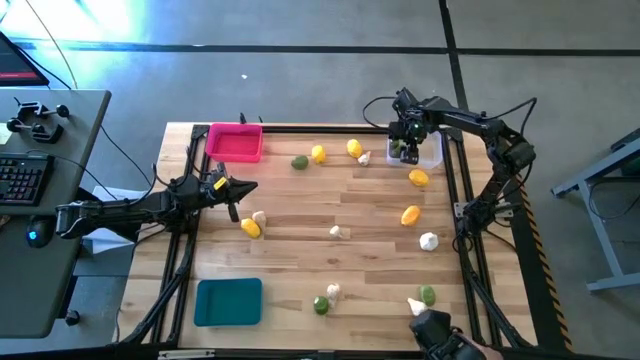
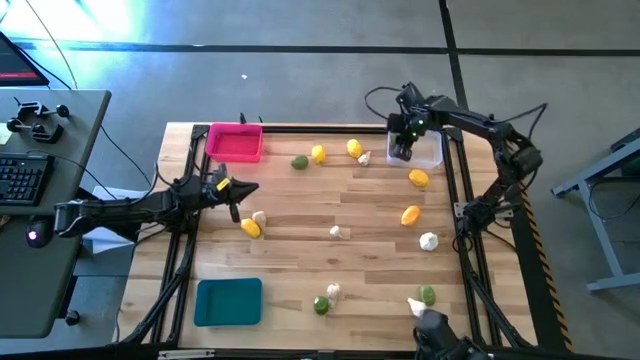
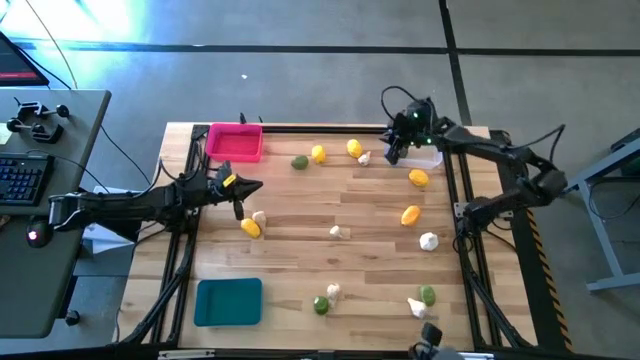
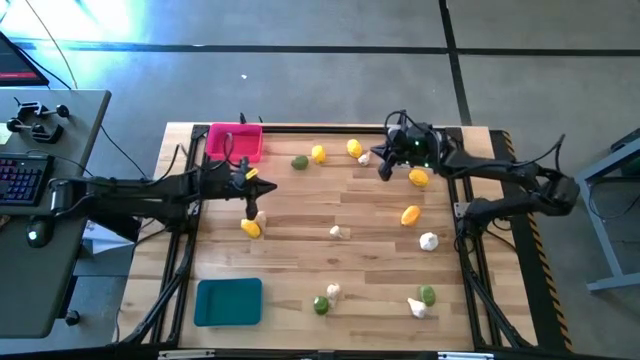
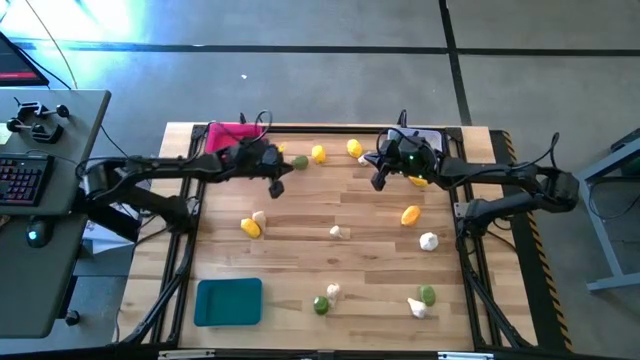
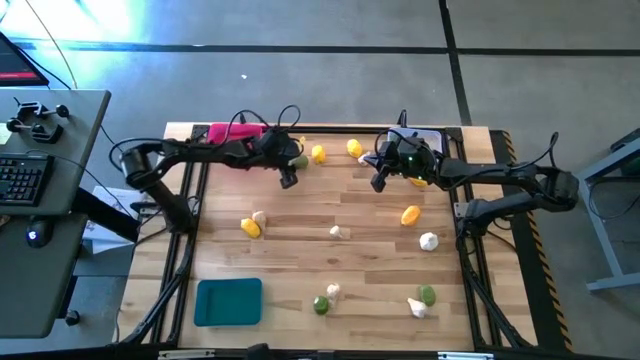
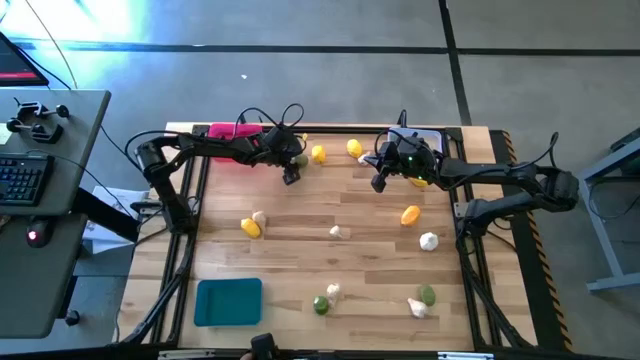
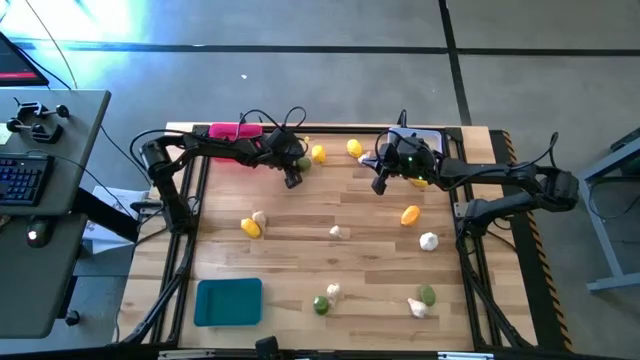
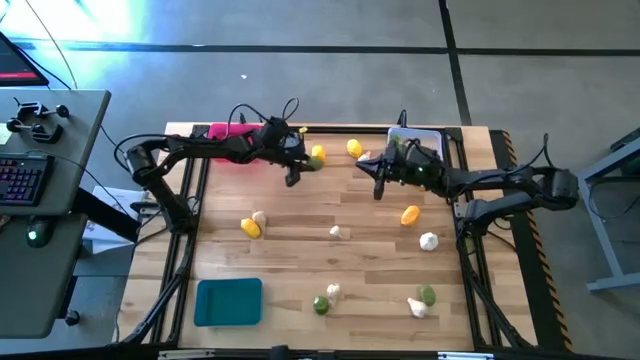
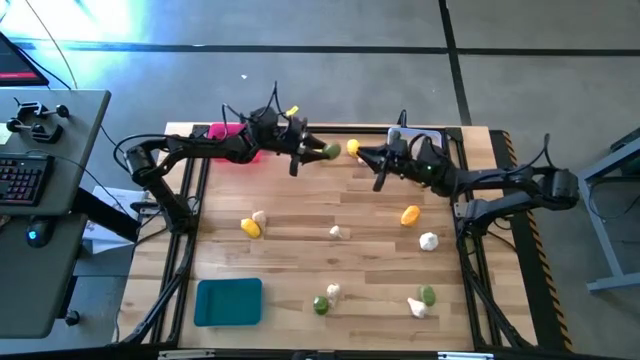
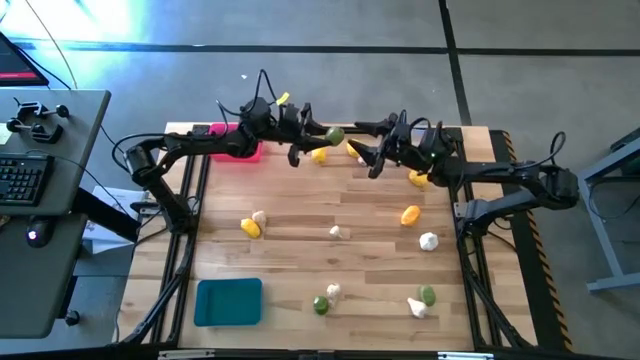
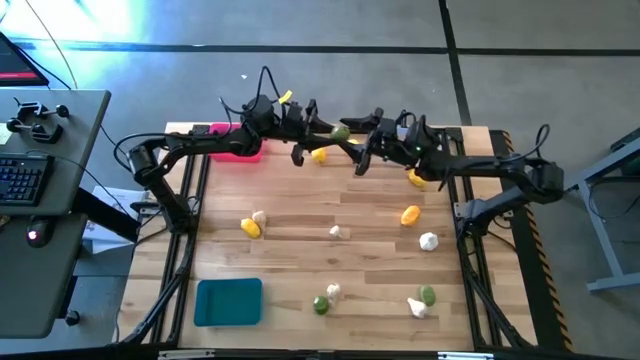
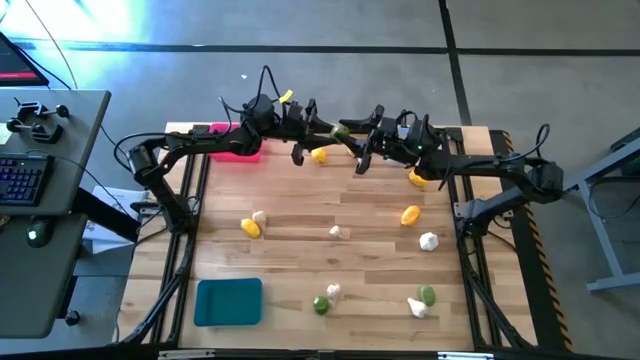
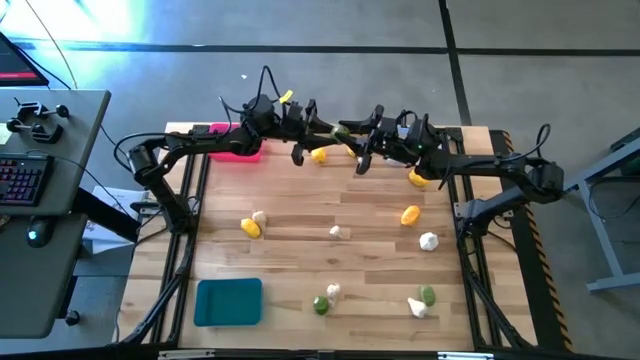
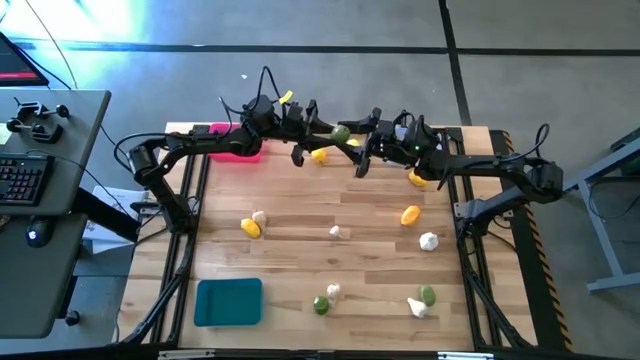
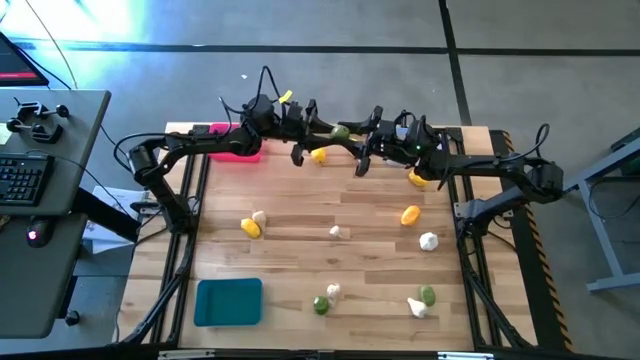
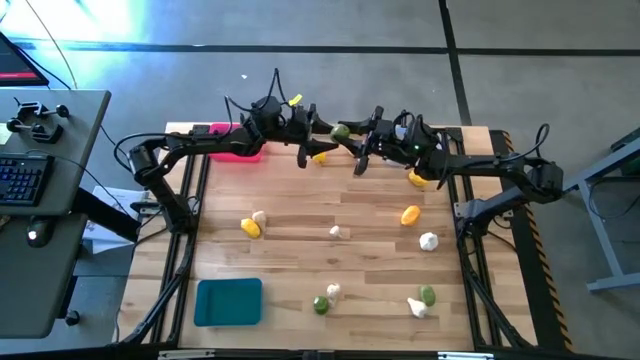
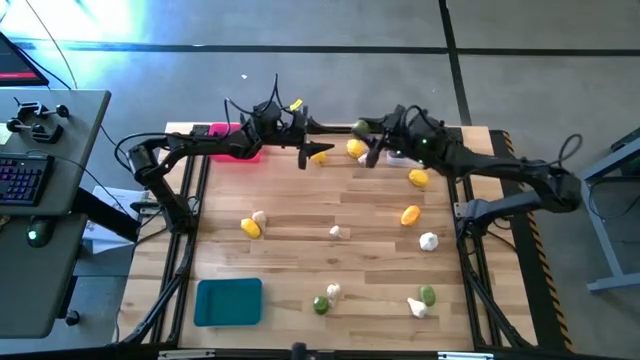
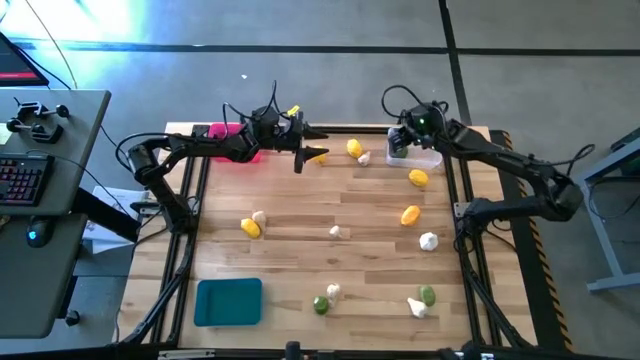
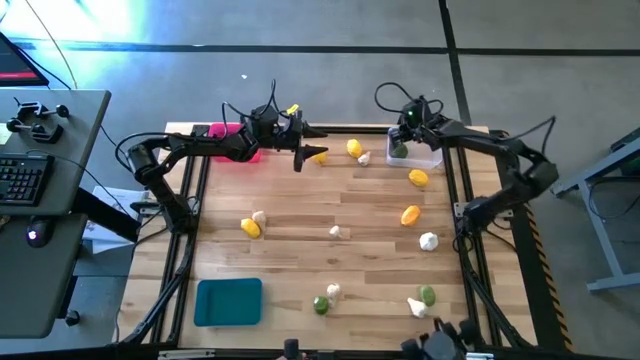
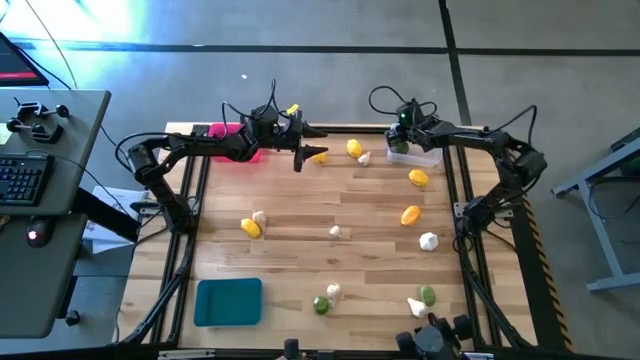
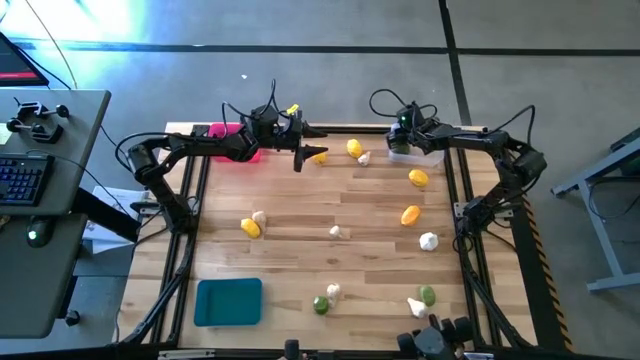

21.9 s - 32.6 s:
Task: Sort produce into baskets
Put the top center lime into the transparent bin

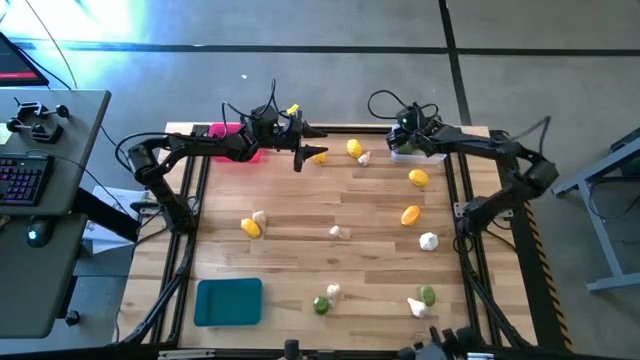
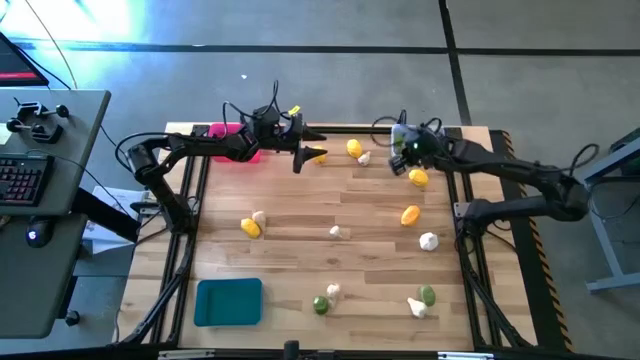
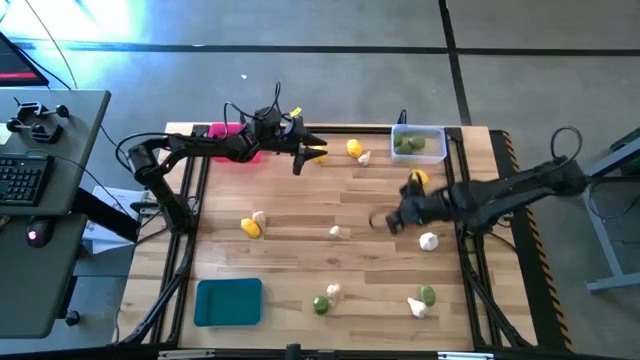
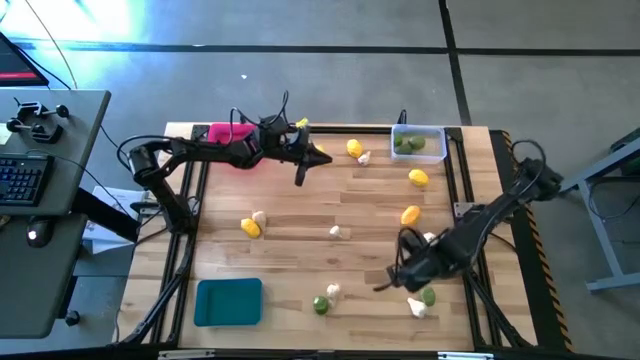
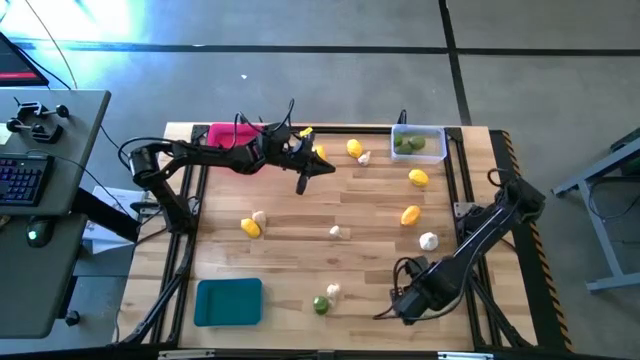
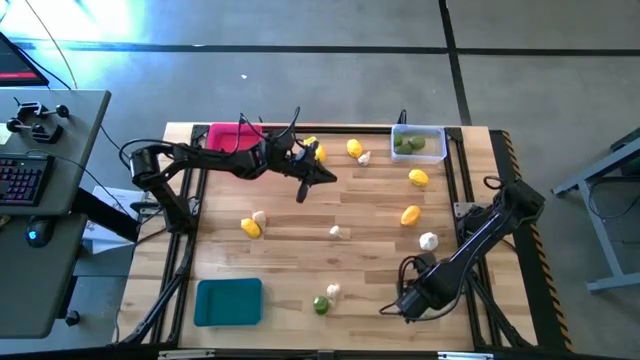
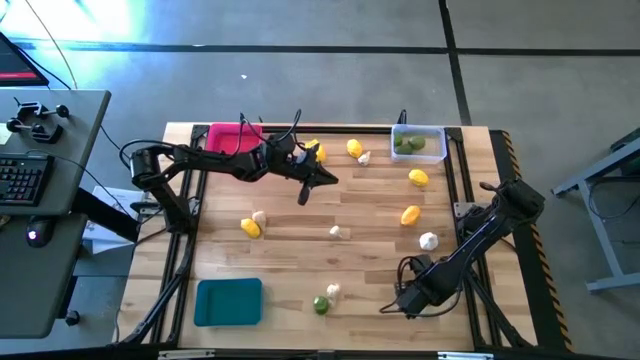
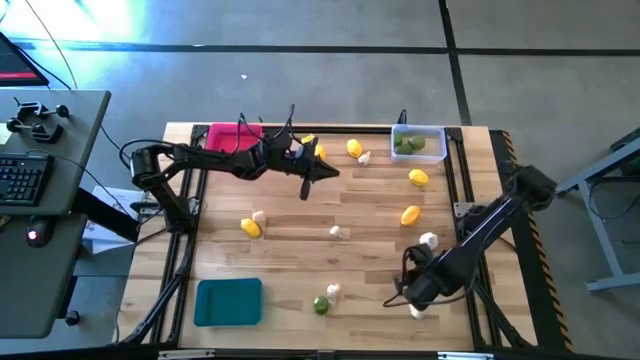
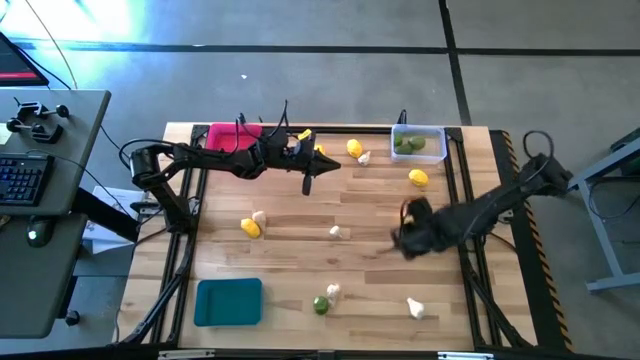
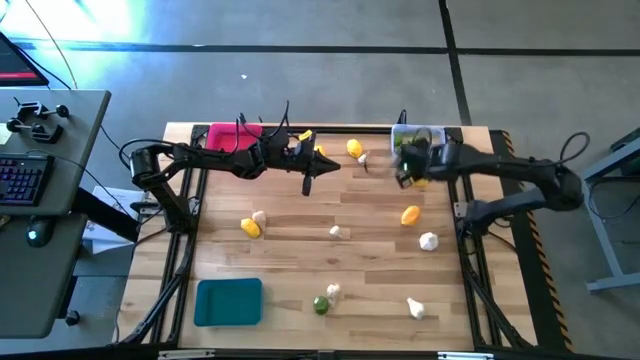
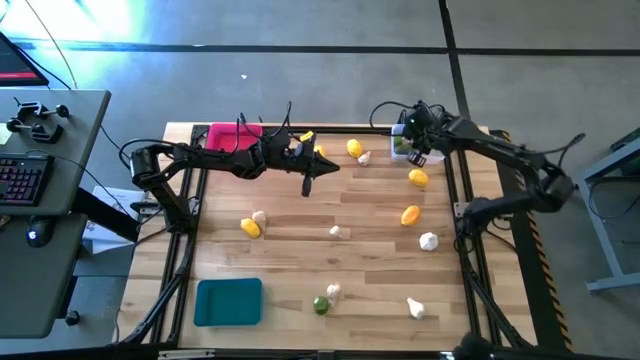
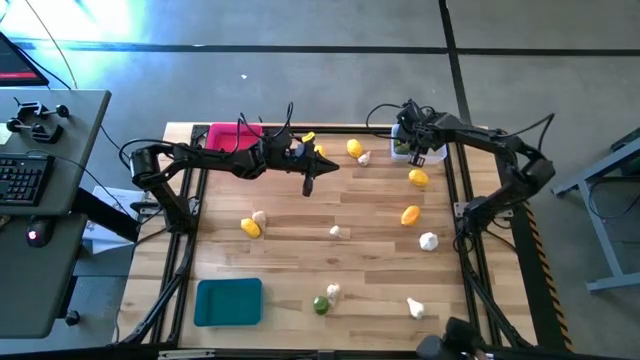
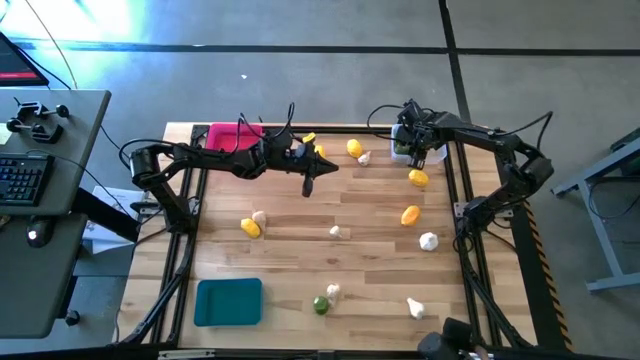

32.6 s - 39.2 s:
Put the right lime into the transparent bin

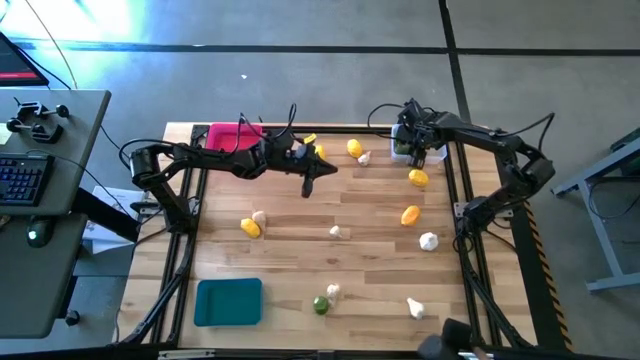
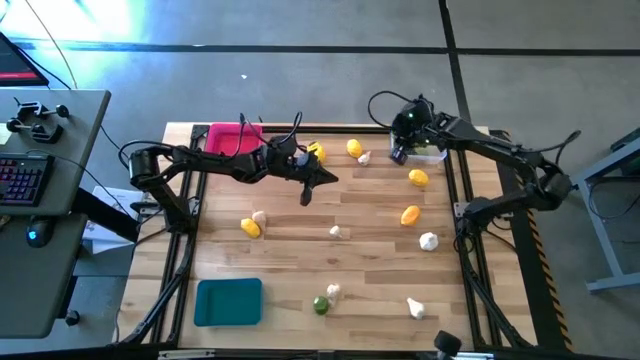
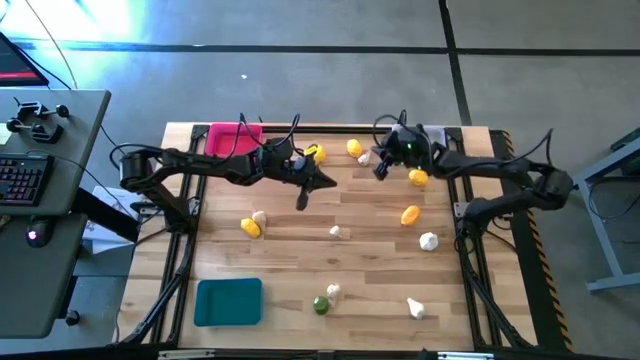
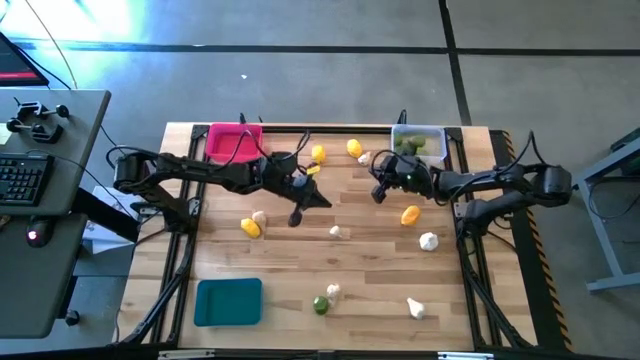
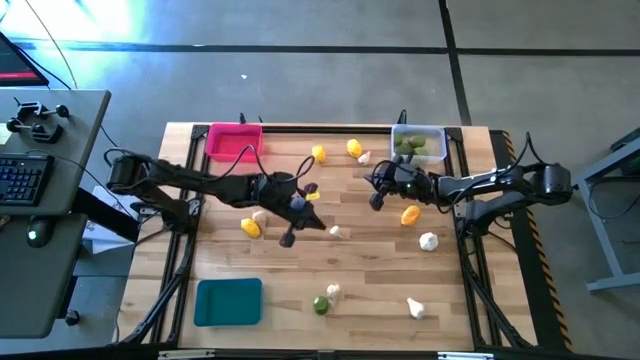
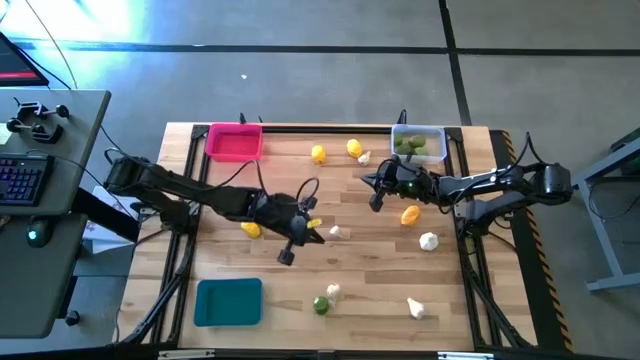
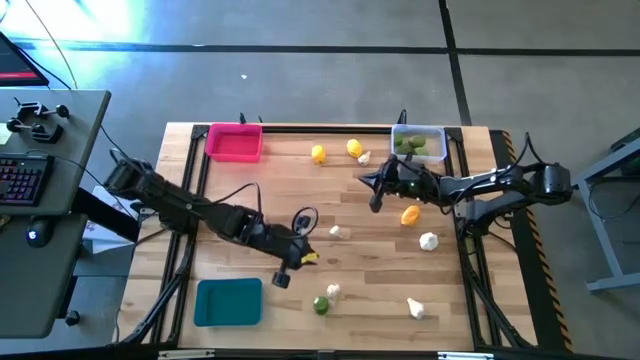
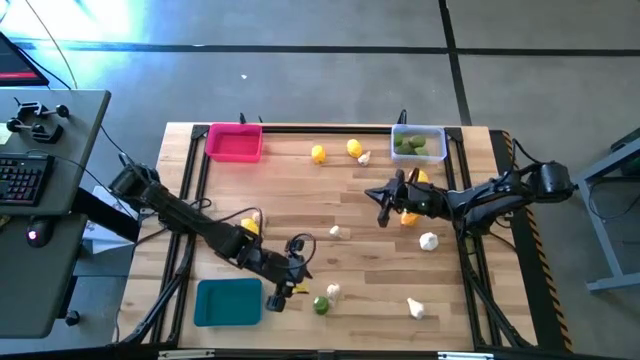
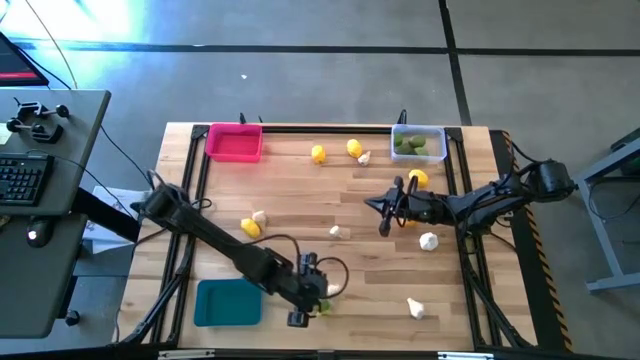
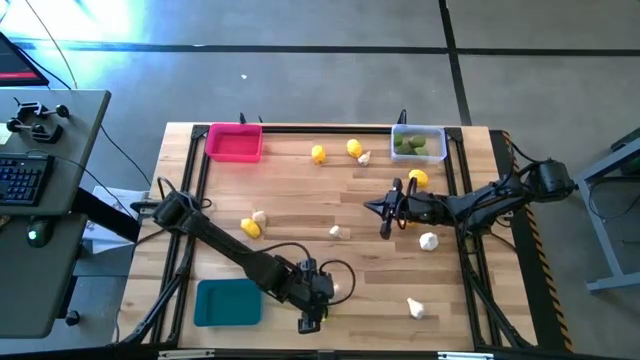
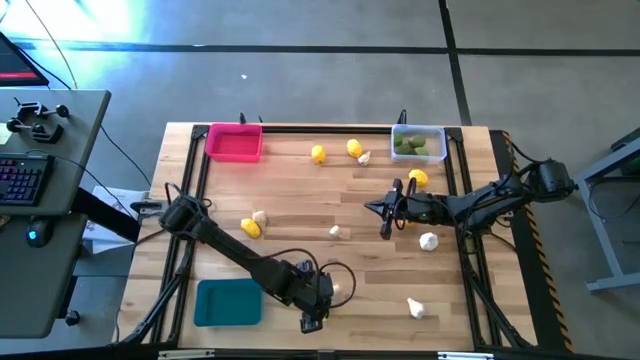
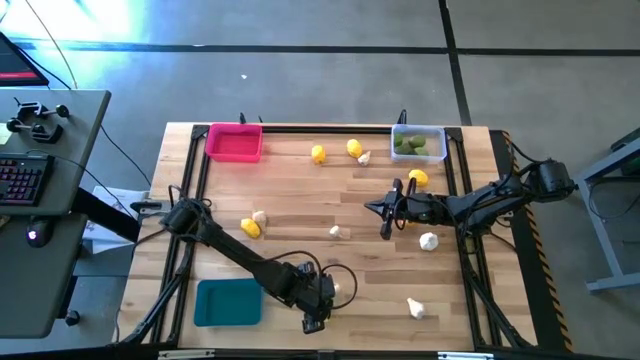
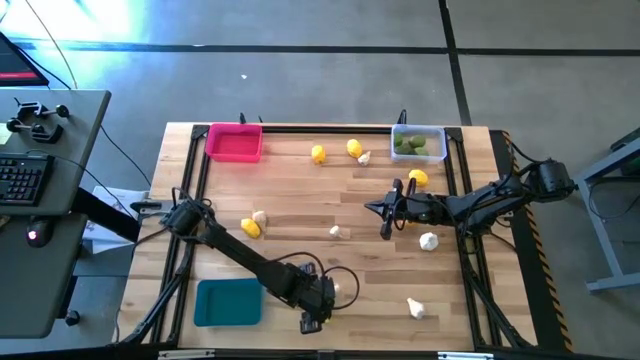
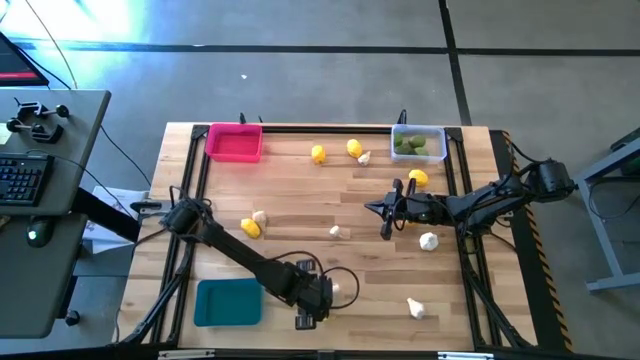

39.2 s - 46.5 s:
Put the lime into the transparent bin
